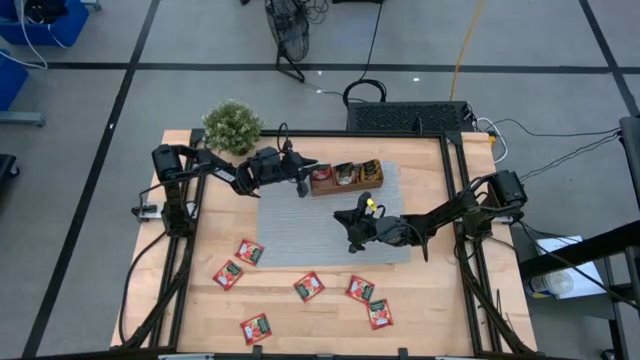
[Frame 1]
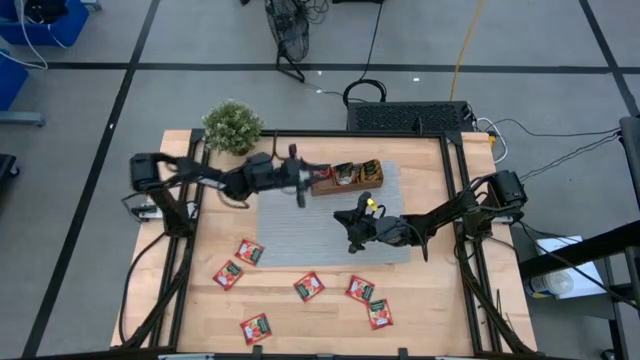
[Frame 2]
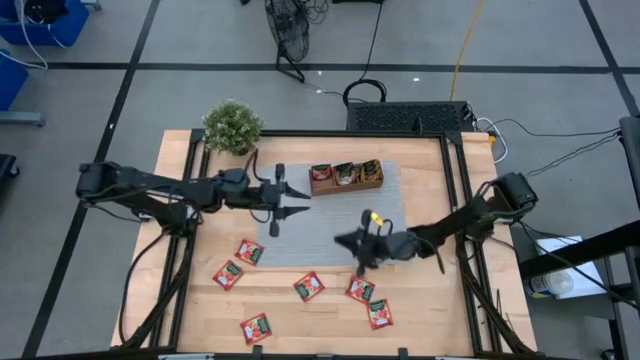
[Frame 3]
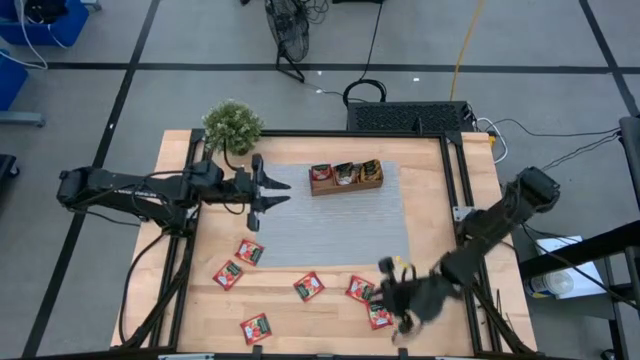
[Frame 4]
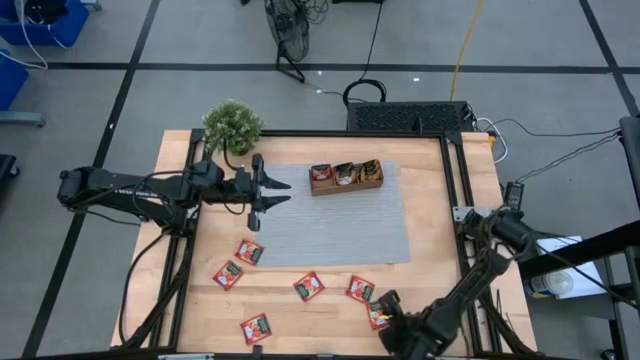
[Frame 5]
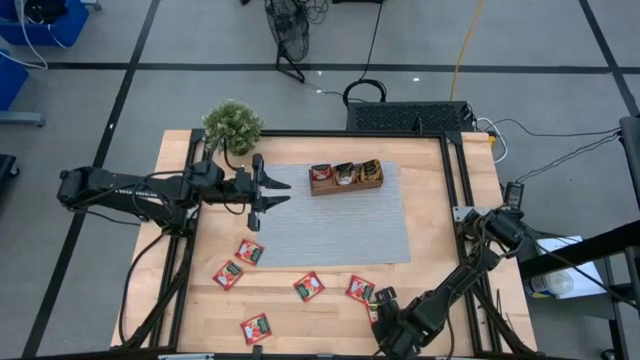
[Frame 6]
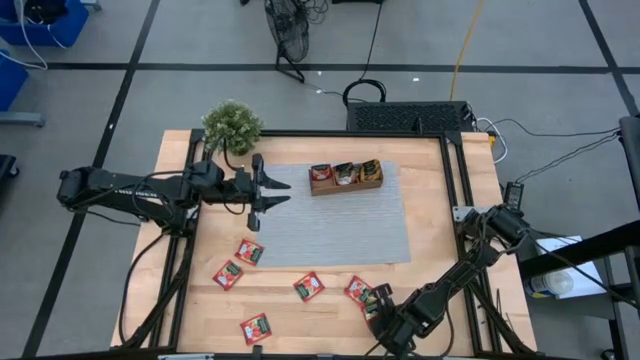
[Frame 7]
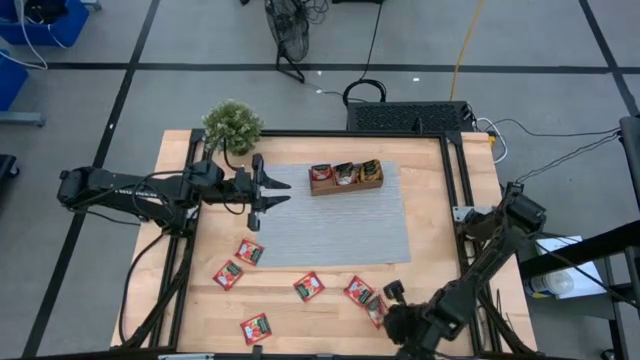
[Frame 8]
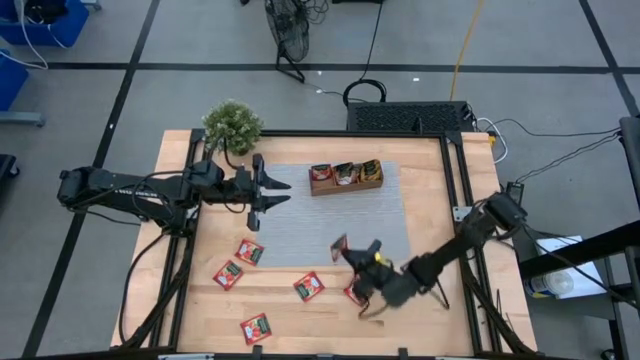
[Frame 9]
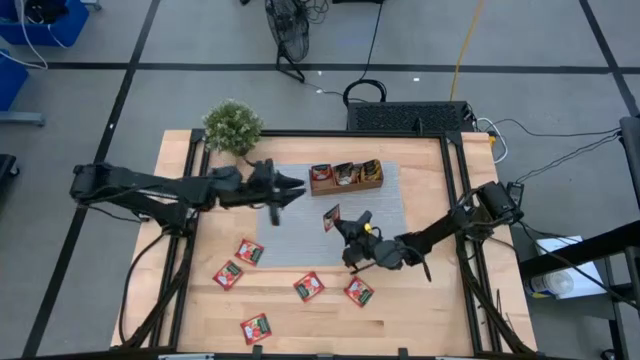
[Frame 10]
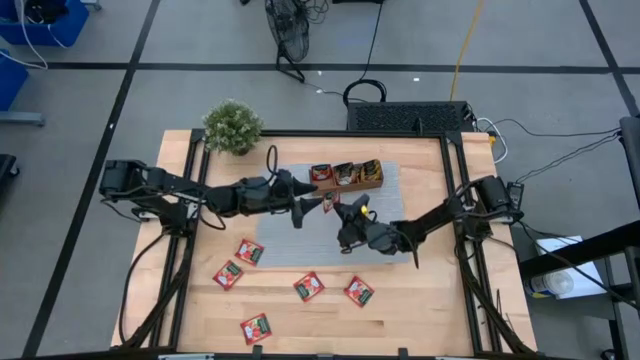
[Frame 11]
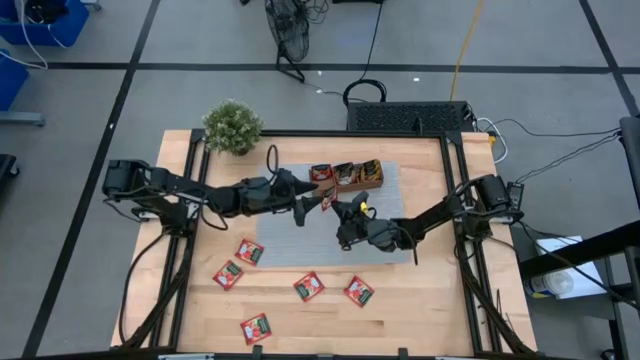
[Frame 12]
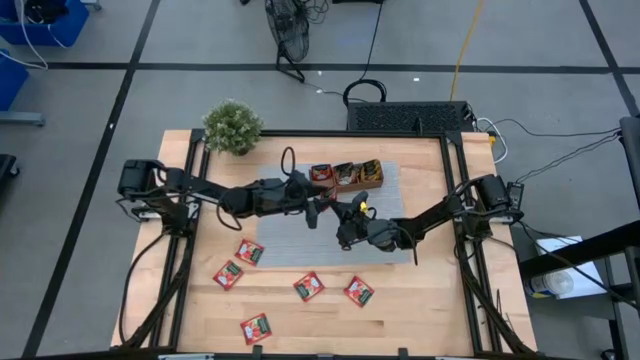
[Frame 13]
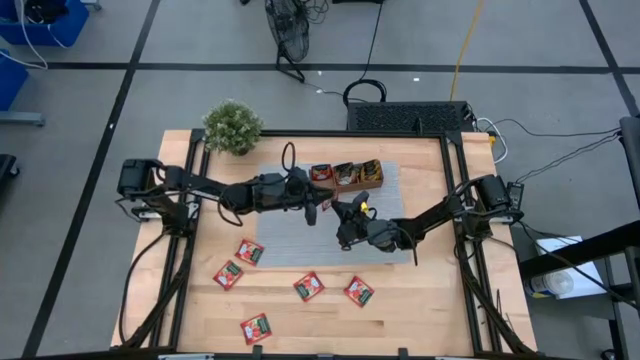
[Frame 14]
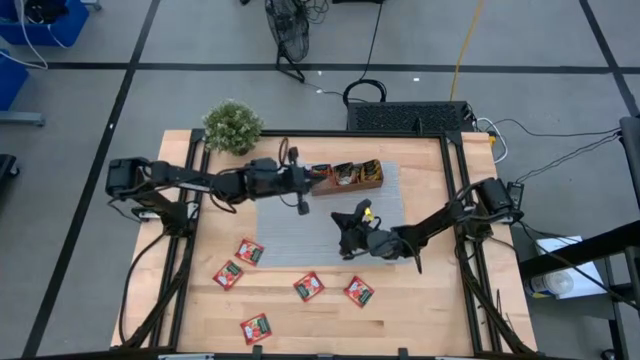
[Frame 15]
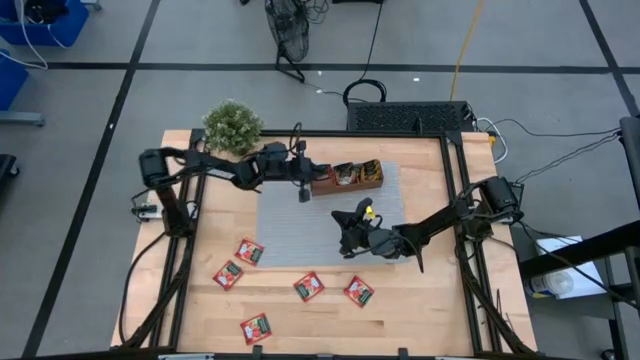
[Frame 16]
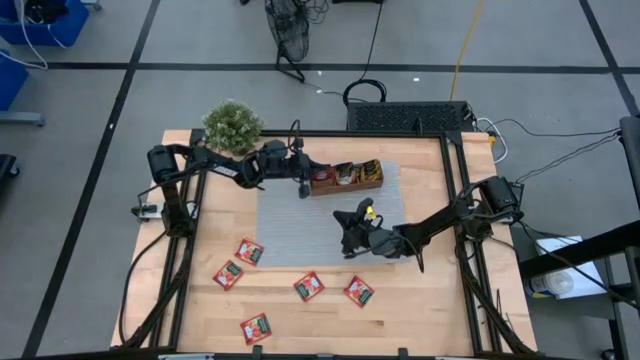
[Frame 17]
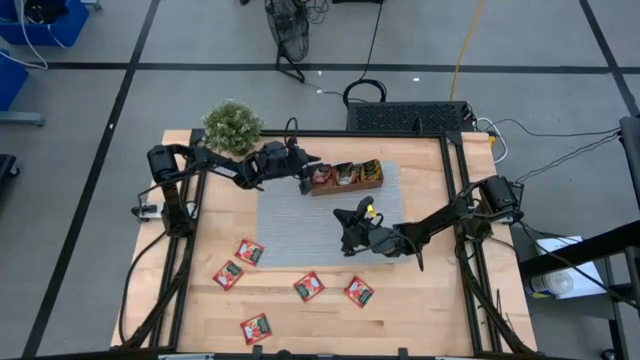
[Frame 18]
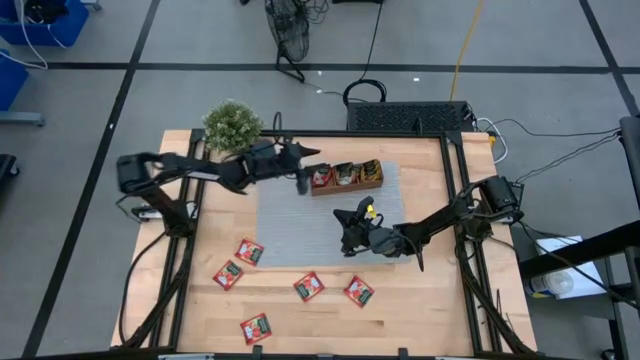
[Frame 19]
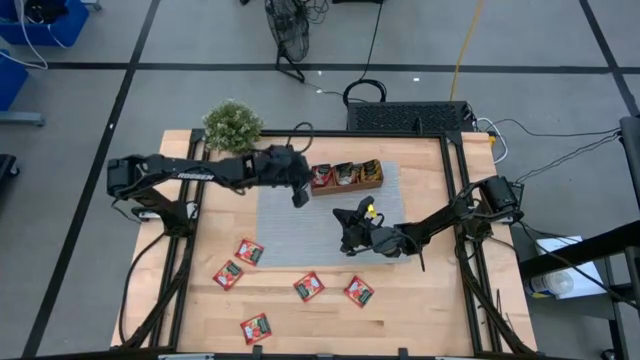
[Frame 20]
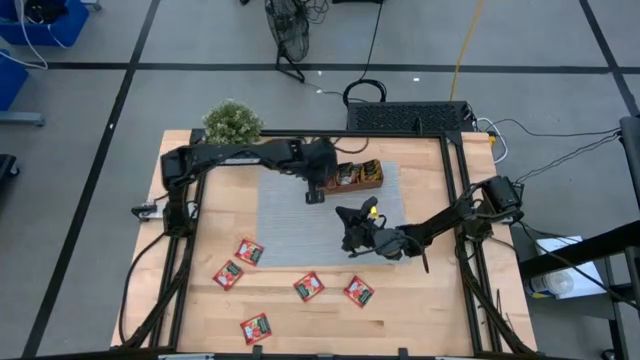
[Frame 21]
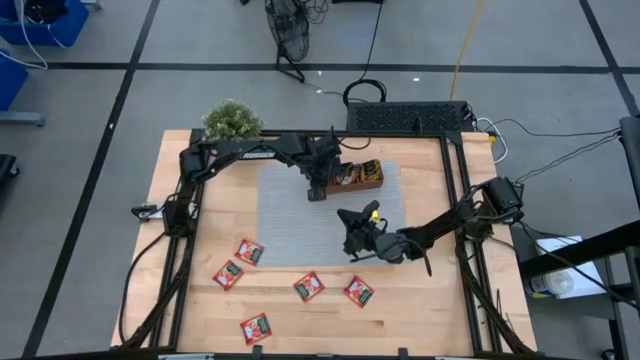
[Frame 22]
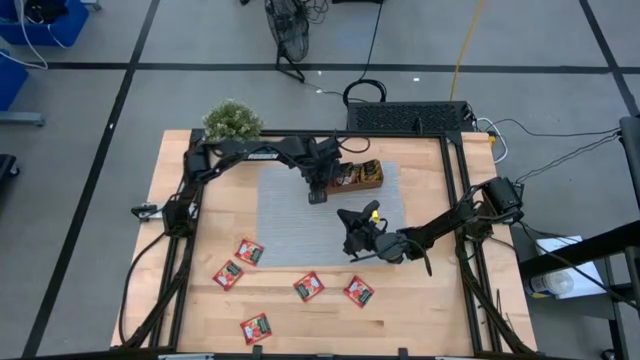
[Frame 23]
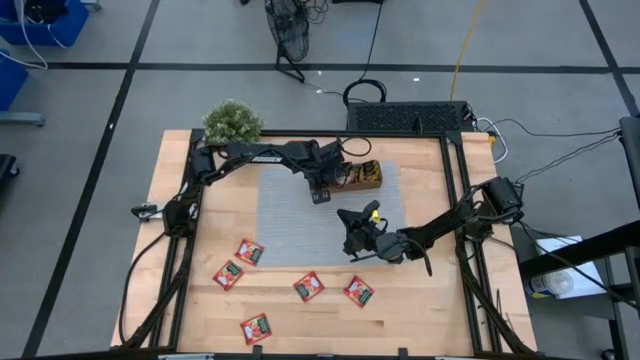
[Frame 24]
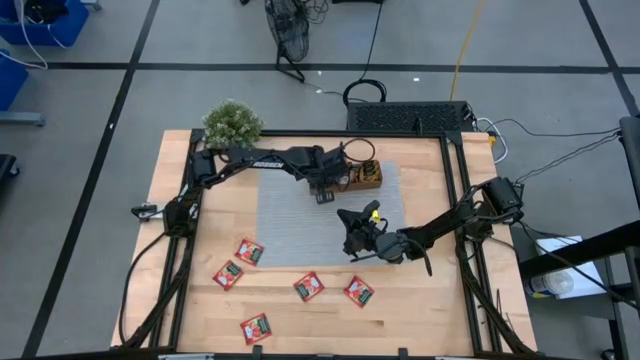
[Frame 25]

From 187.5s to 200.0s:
Task: Pick & Place Tea
Put the red tea bag into the left section of the wooden organizer

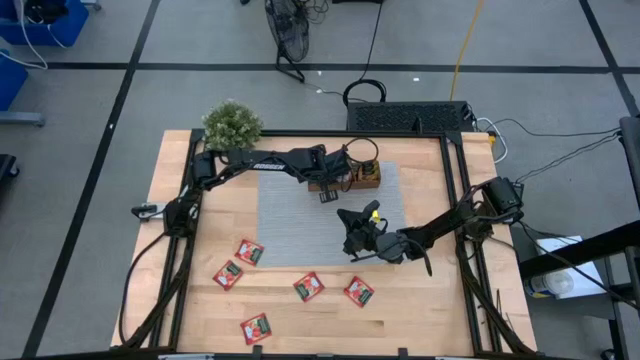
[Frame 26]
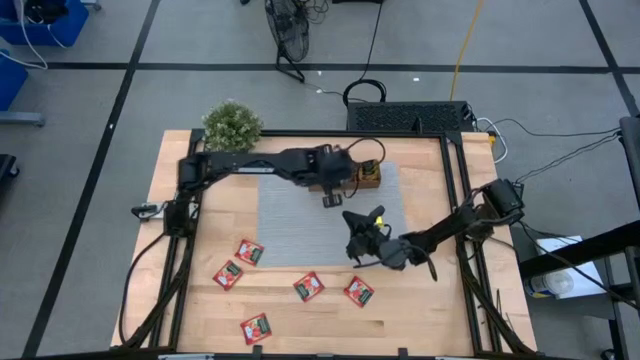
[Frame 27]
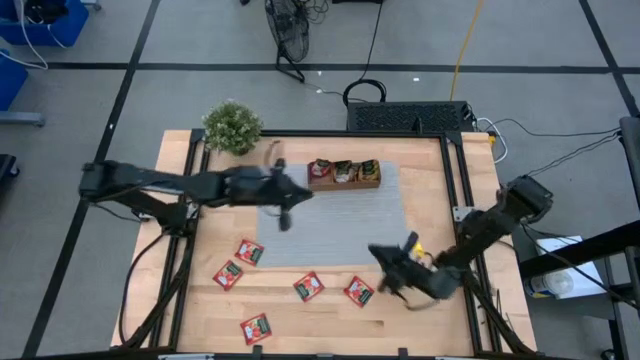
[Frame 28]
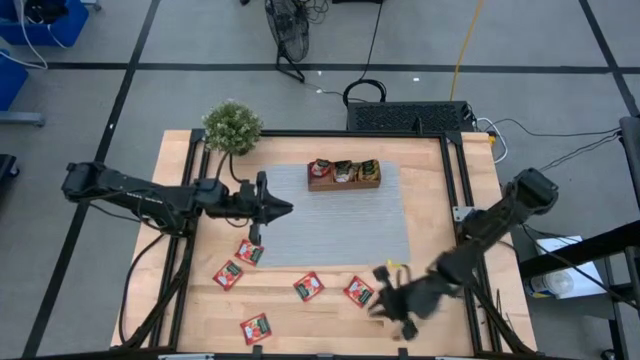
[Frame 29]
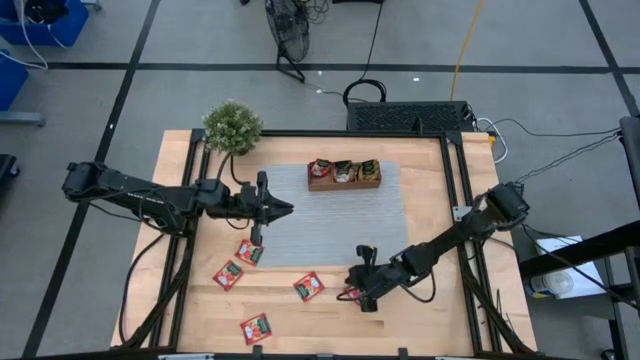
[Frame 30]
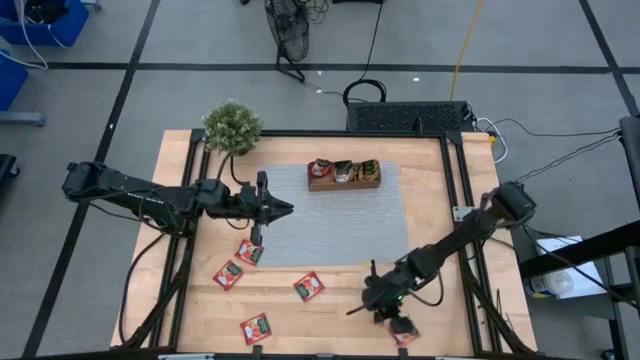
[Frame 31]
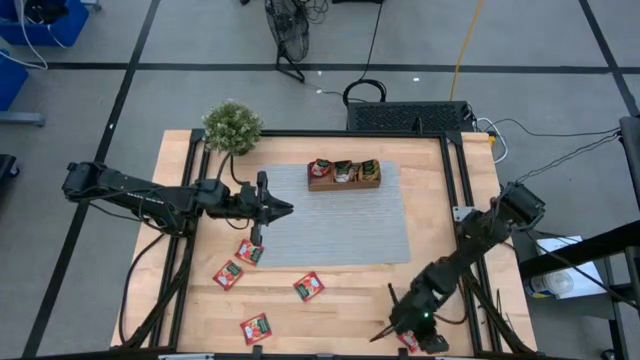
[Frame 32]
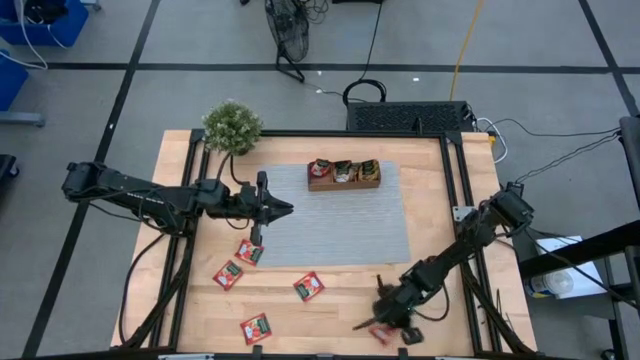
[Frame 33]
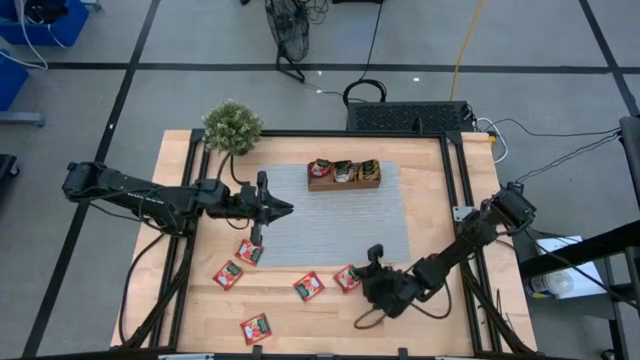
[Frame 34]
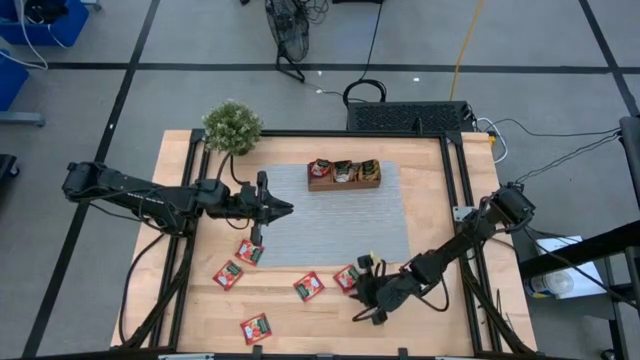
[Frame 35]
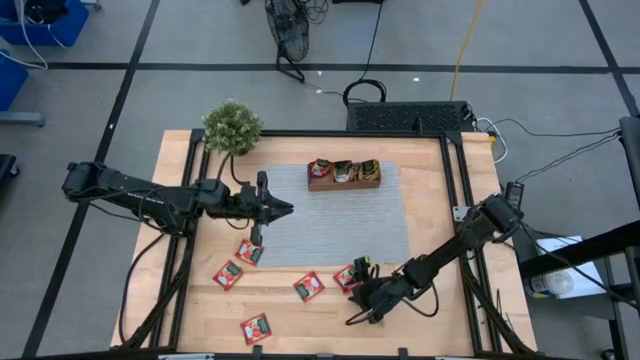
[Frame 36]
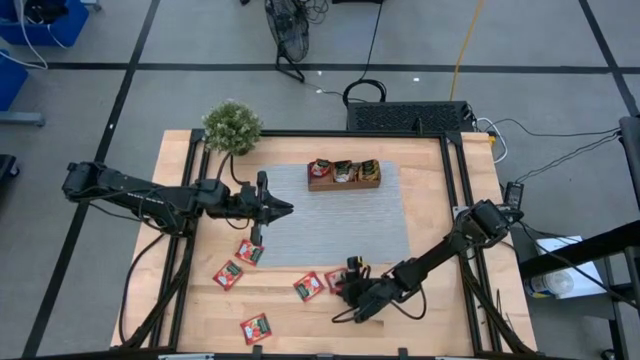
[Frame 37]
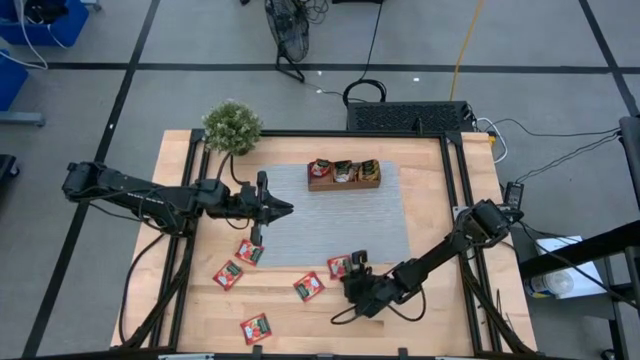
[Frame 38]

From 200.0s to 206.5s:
Put the red tea bag into the left section of the wooden organizer

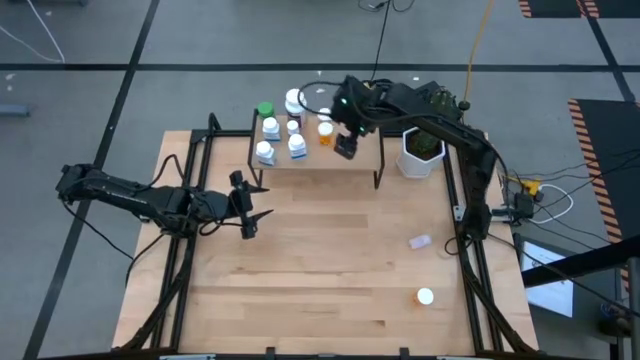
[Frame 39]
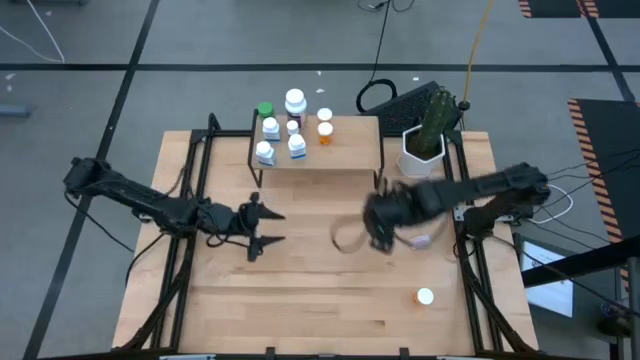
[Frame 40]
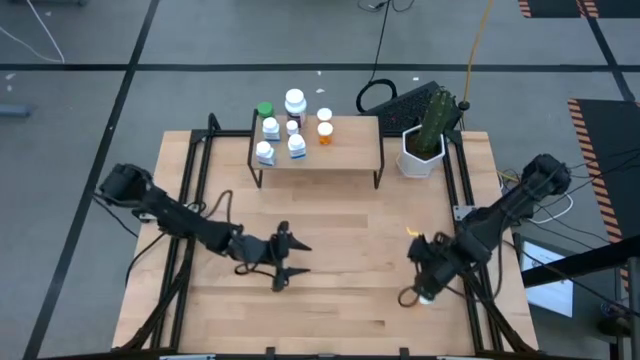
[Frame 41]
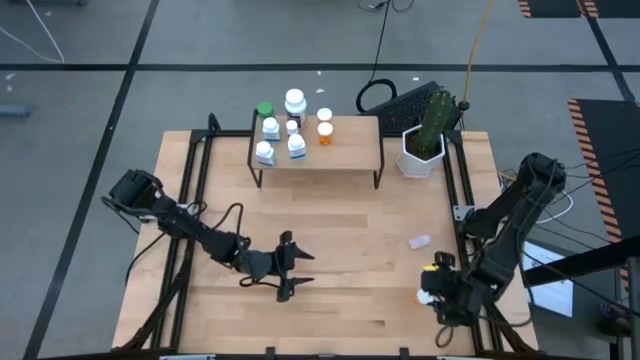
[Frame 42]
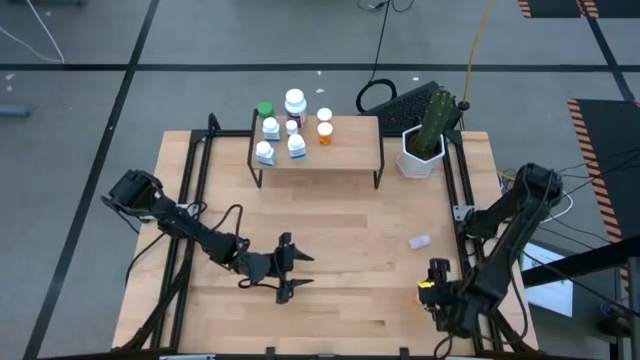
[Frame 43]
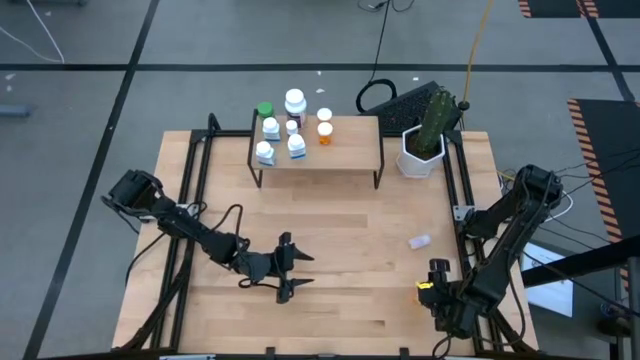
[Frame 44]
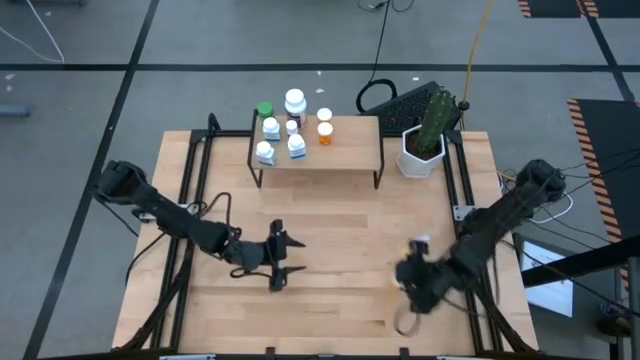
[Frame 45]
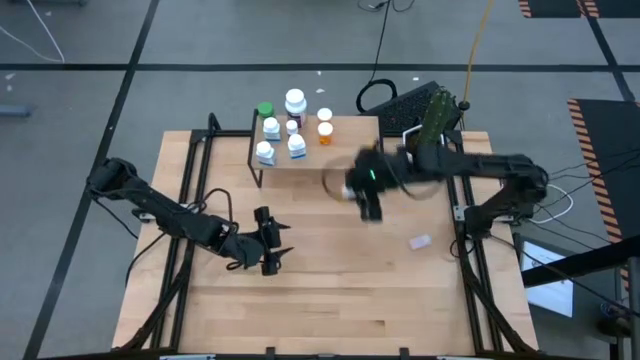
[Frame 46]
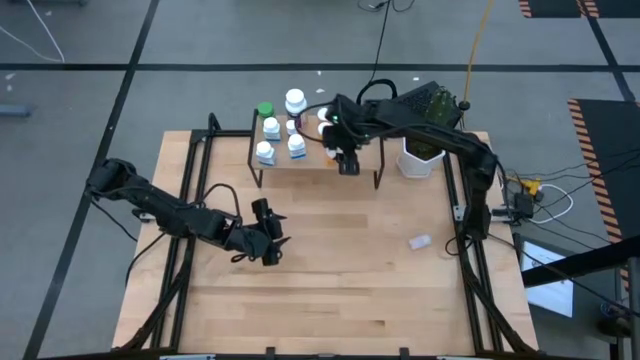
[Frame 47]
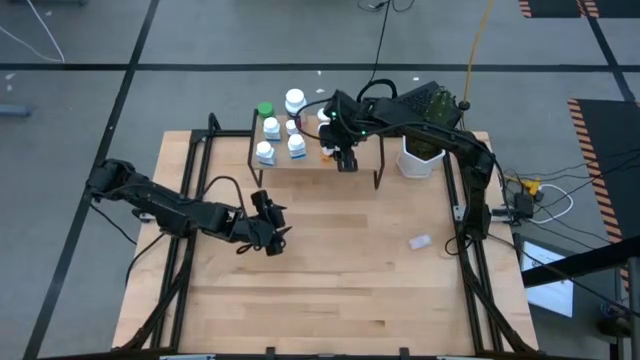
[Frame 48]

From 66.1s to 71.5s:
Task: Pick and place medicine bottles onto shelf by color
Put the orange pill bottle on the shelf
